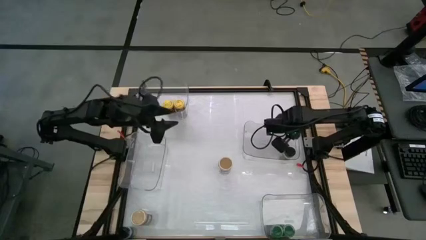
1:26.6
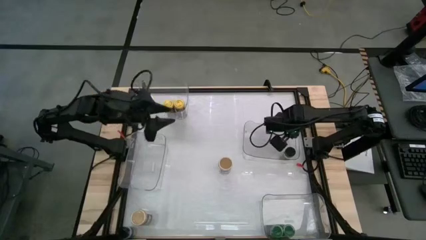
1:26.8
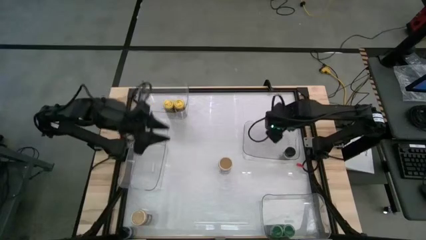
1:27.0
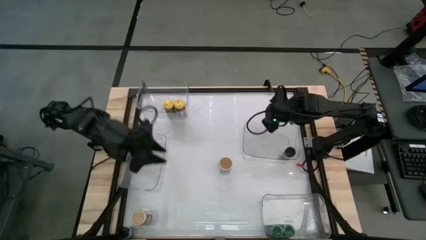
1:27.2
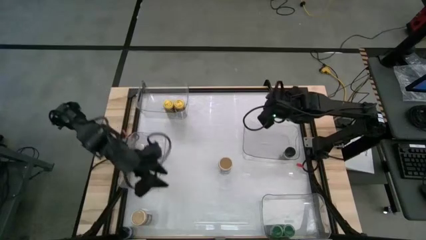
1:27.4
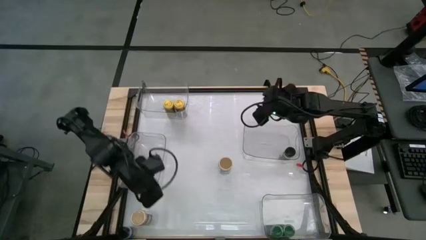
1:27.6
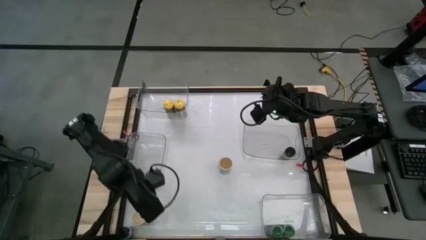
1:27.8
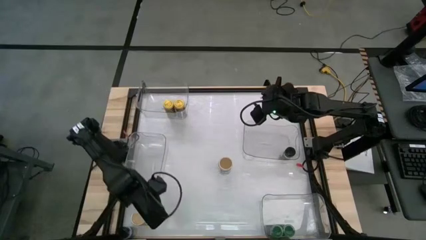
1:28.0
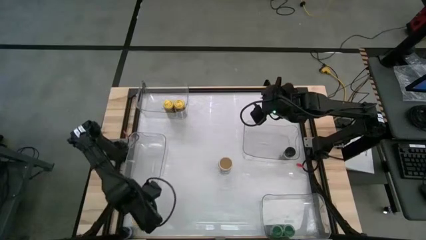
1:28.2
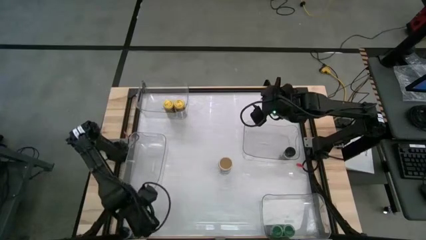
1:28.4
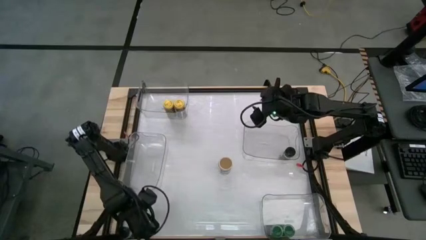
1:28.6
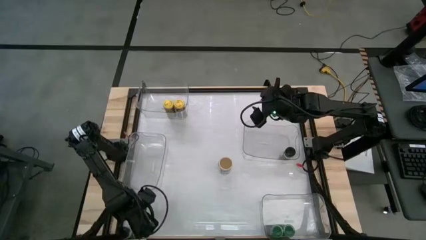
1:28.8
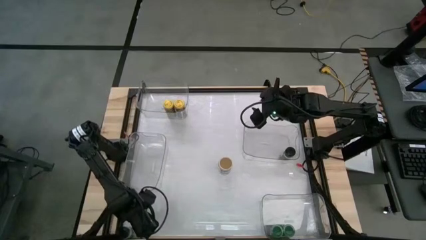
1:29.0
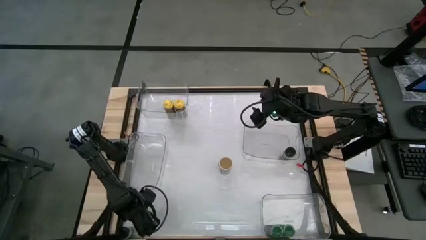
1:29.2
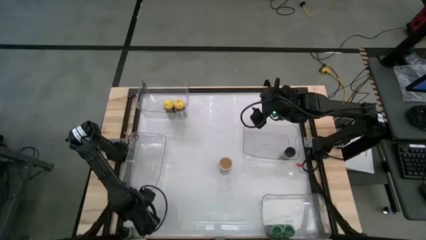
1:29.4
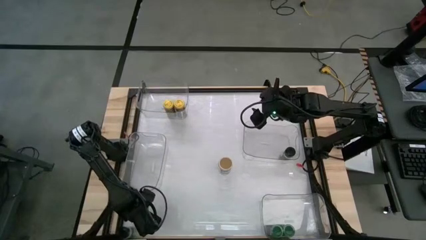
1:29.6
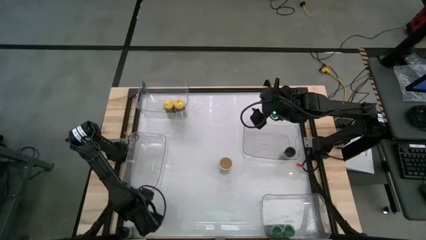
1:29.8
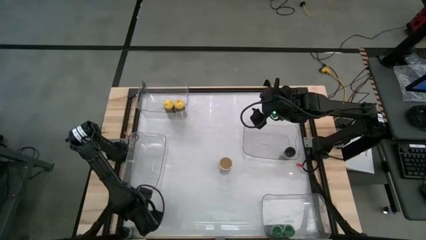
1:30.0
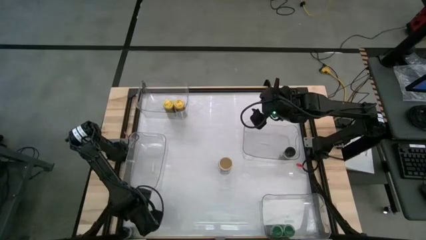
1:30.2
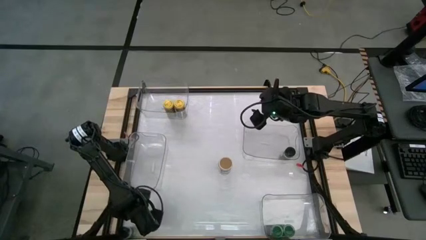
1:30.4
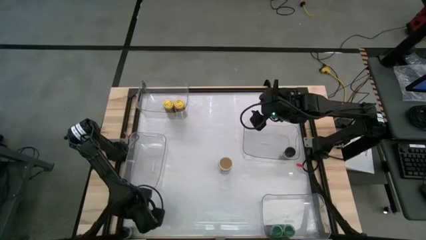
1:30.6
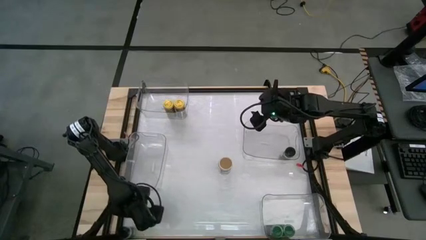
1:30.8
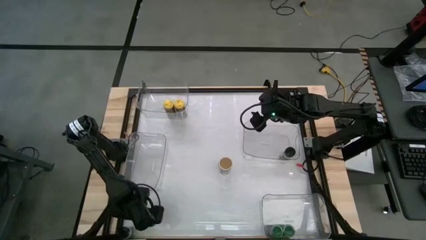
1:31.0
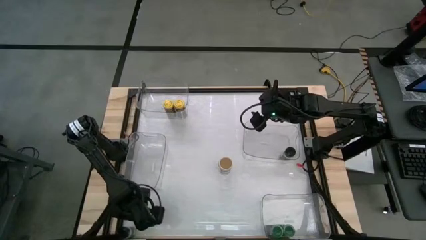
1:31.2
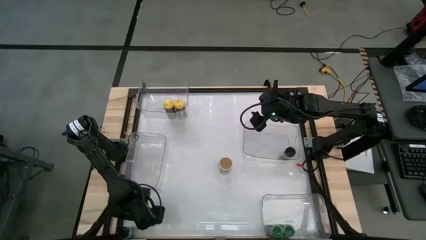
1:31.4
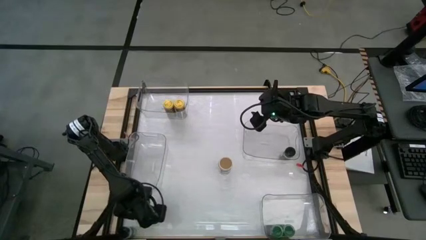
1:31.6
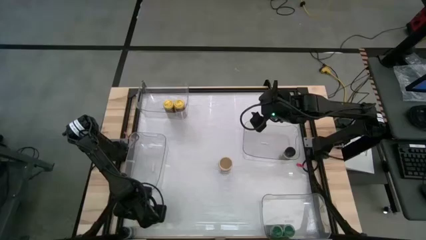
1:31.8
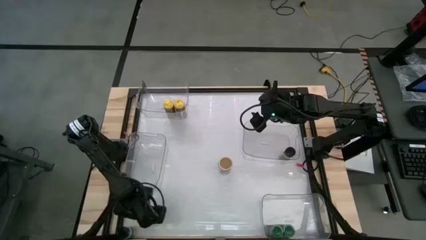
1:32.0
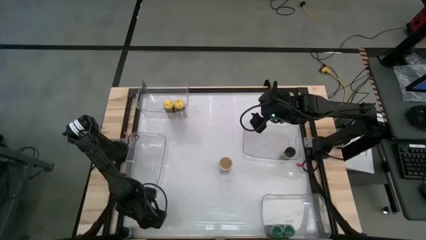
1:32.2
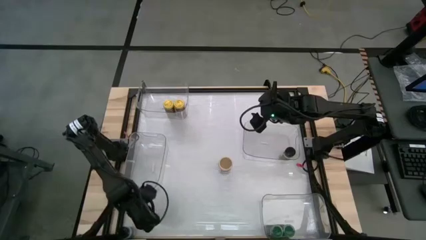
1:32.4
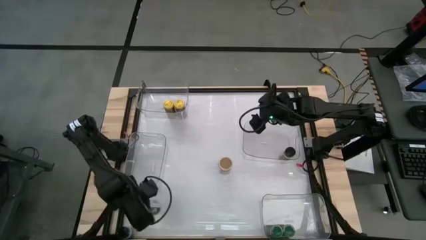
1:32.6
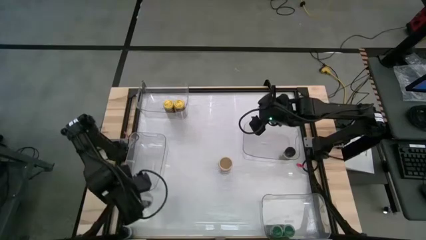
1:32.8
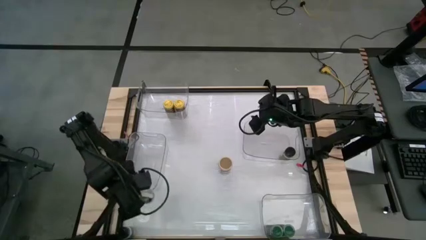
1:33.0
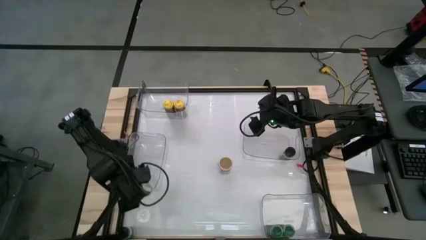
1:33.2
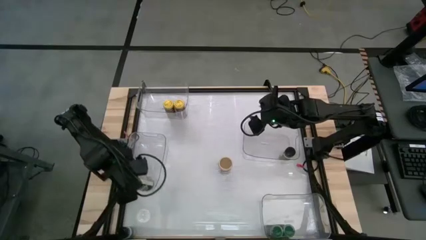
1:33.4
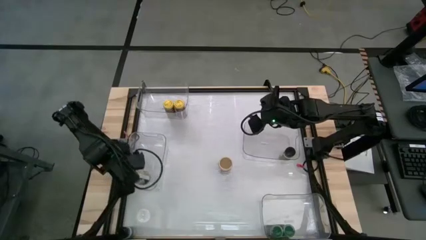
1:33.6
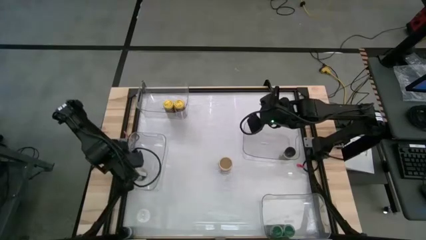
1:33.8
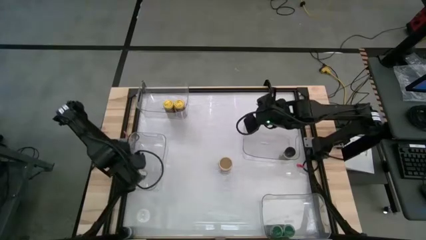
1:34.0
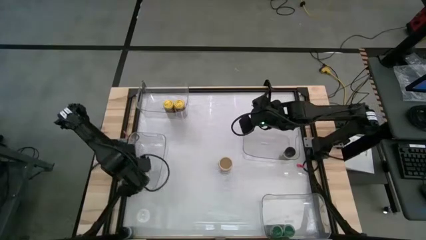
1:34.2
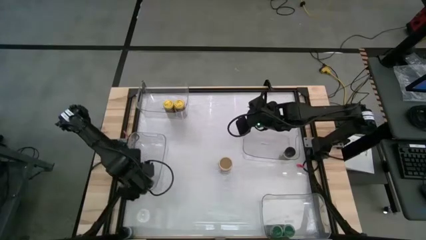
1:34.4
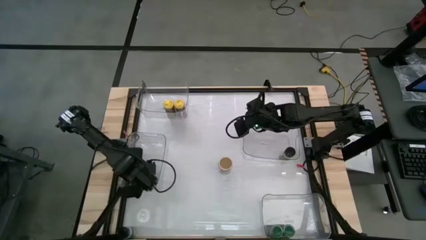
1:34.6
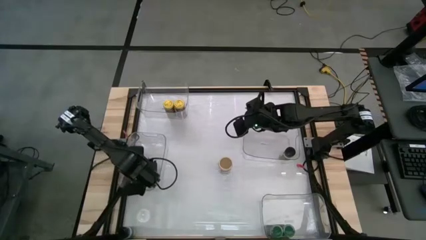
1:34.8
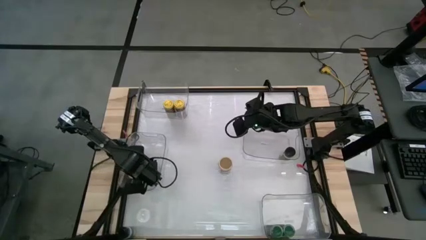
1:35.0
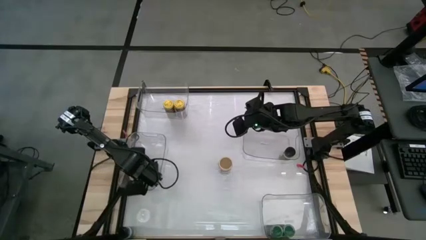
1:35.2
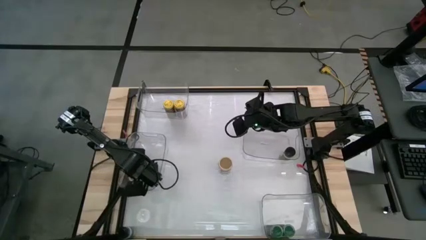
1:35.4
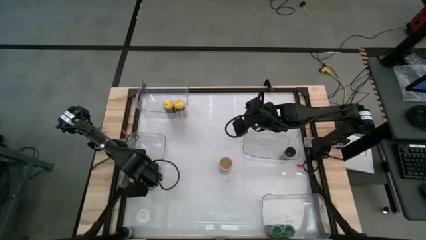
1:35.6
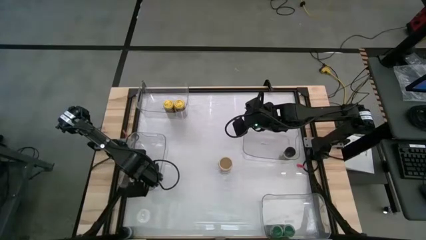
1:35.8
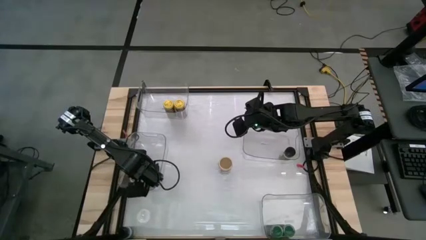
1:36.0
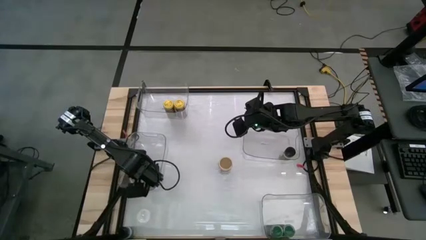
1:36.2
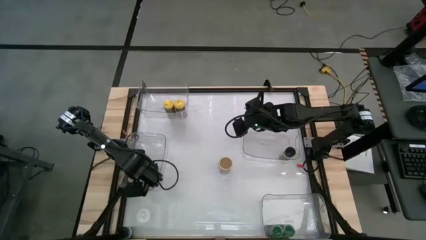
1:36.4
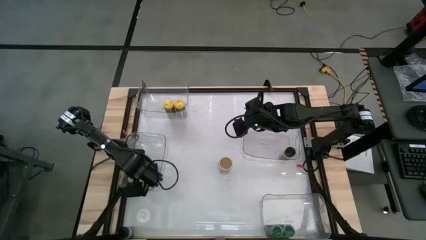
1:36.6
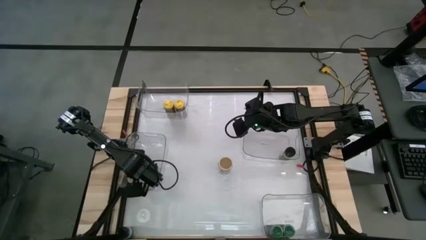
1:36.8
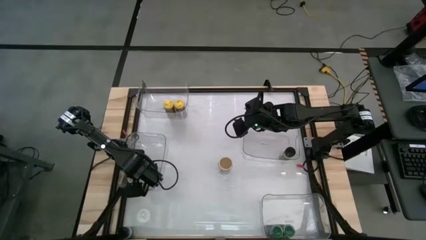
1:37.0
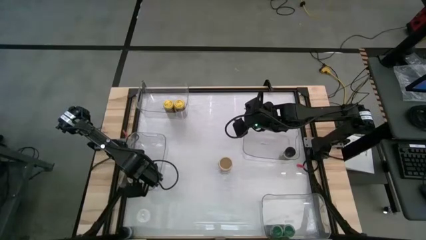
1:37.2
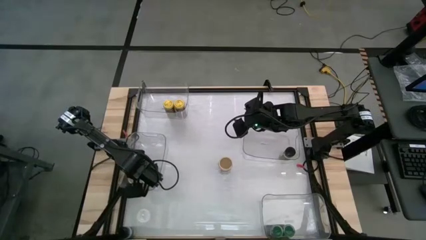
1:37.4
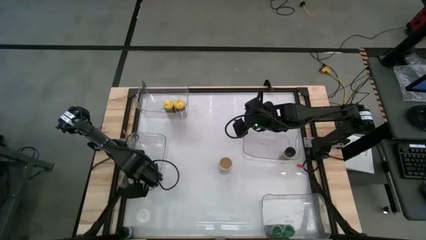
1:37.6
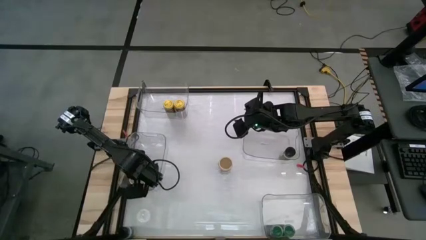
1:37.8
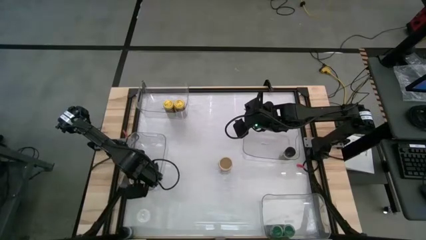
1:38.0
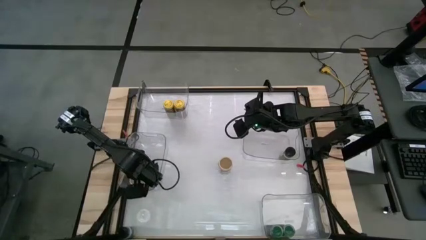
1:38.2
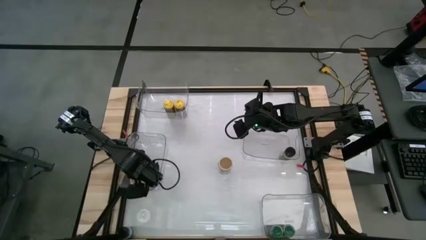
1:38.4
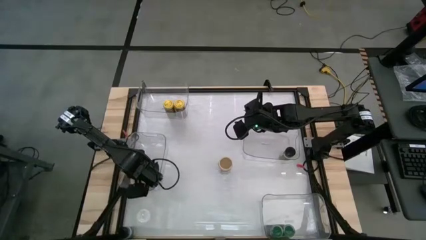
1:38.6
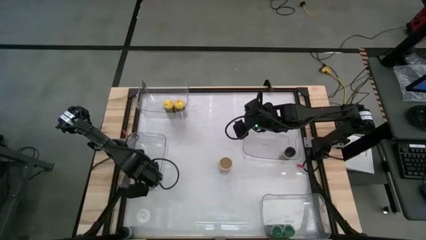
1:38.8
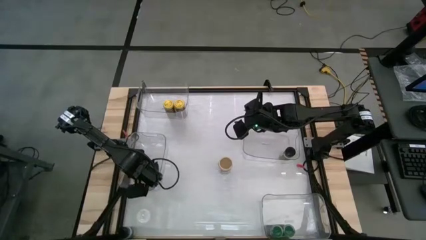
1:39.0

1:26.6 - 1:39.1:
Task: Sort spices by type
Put the bottom gold seasoning bottle into the middle left transparent bin
